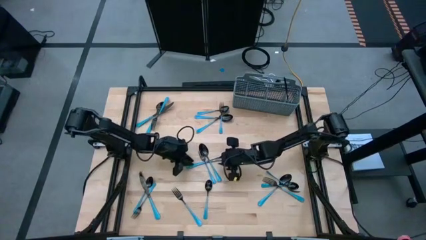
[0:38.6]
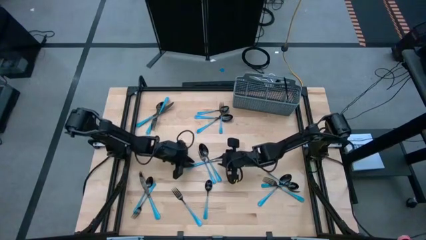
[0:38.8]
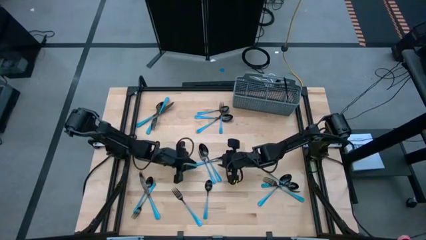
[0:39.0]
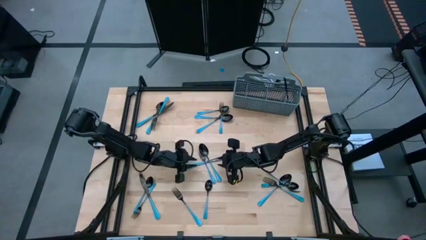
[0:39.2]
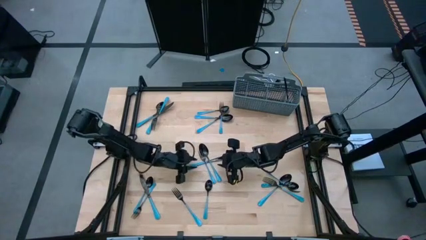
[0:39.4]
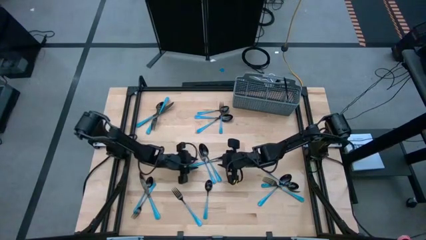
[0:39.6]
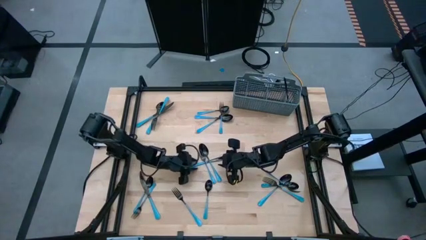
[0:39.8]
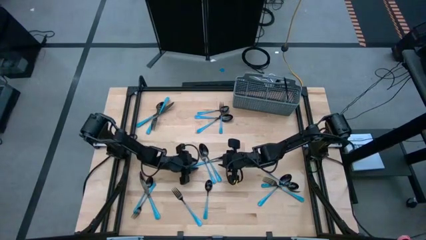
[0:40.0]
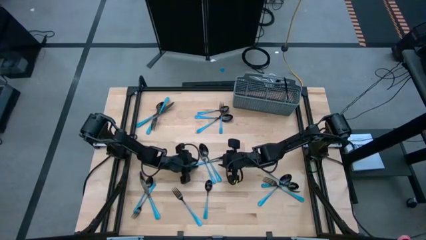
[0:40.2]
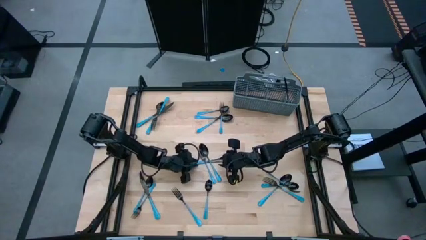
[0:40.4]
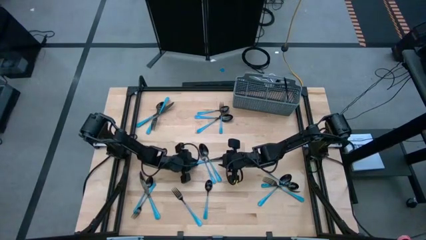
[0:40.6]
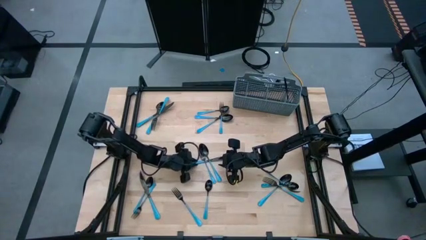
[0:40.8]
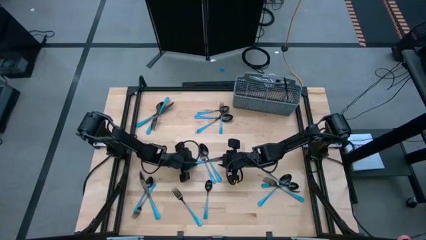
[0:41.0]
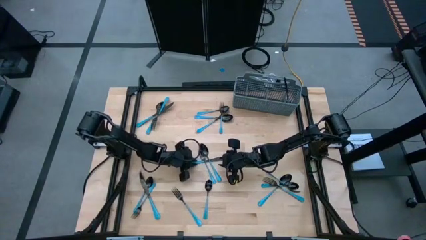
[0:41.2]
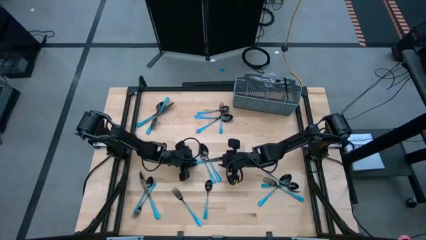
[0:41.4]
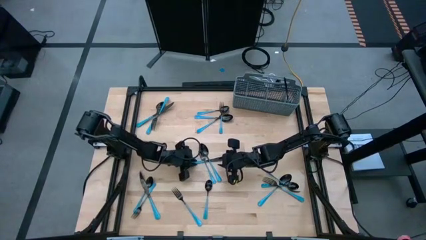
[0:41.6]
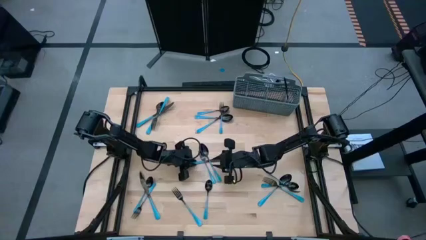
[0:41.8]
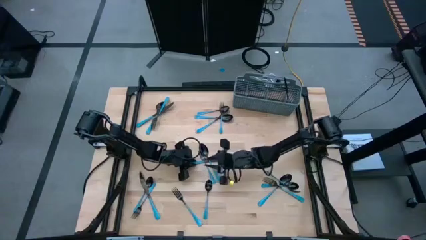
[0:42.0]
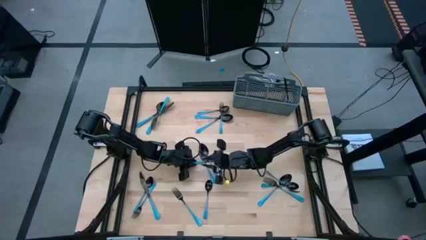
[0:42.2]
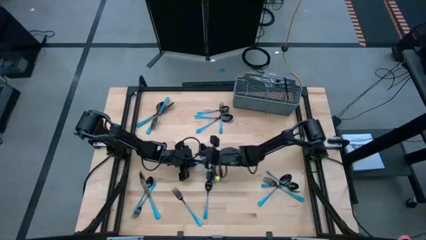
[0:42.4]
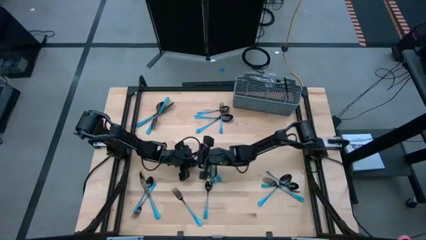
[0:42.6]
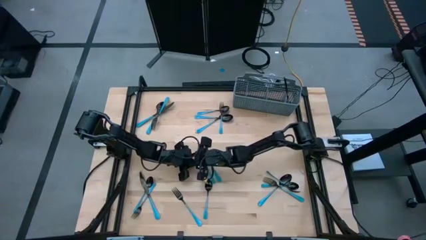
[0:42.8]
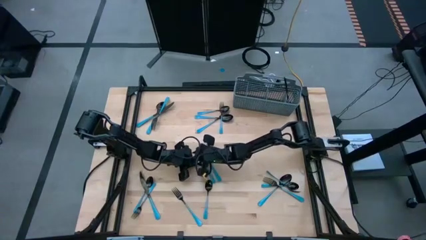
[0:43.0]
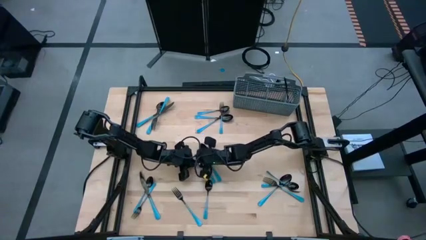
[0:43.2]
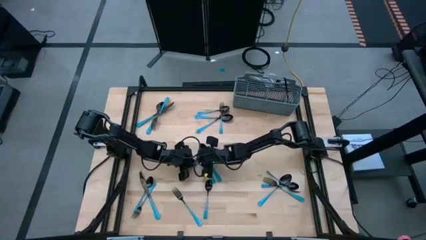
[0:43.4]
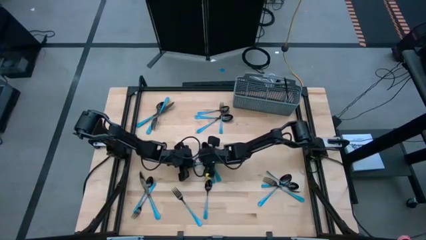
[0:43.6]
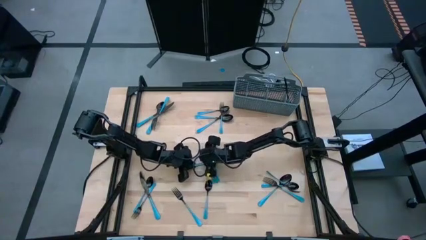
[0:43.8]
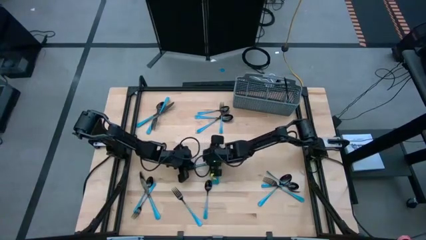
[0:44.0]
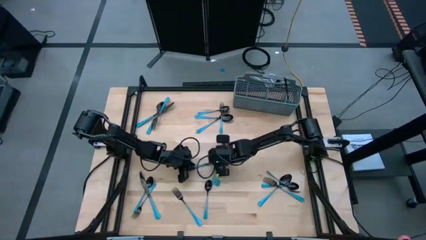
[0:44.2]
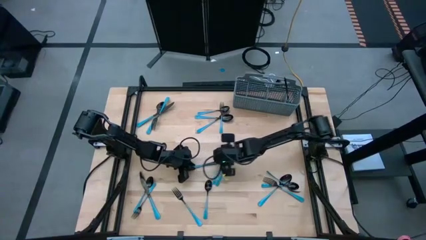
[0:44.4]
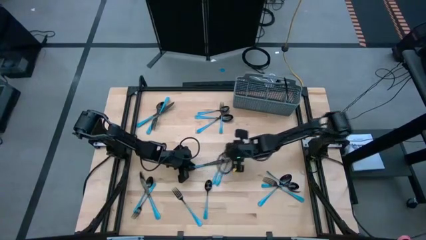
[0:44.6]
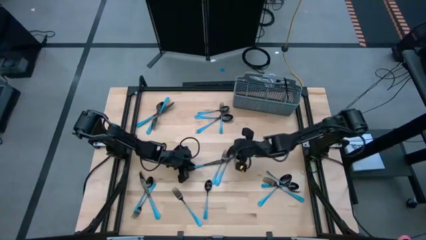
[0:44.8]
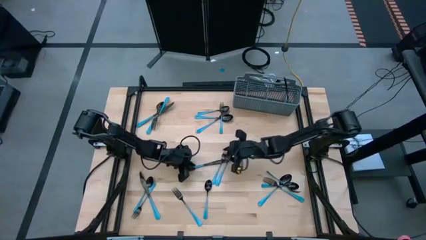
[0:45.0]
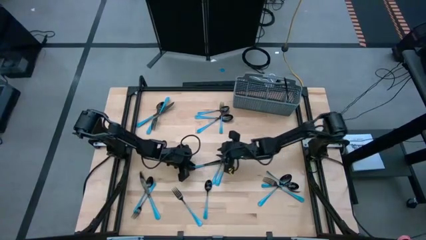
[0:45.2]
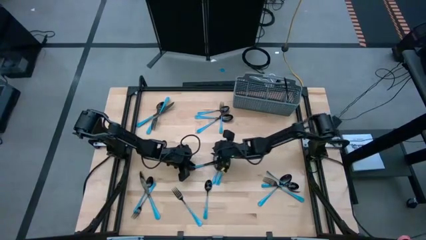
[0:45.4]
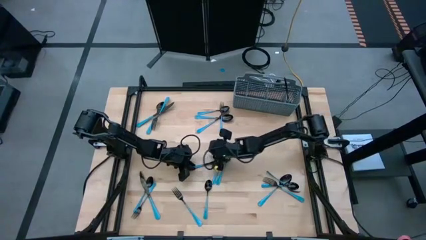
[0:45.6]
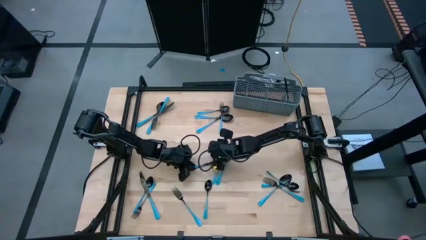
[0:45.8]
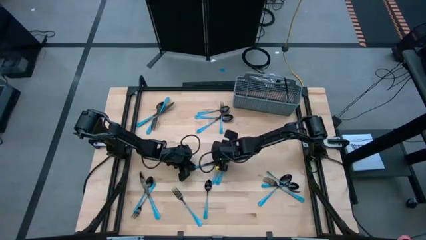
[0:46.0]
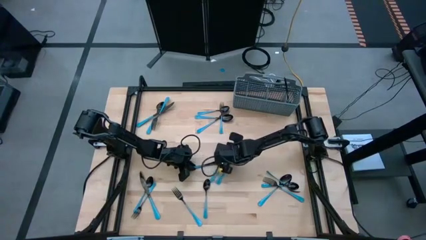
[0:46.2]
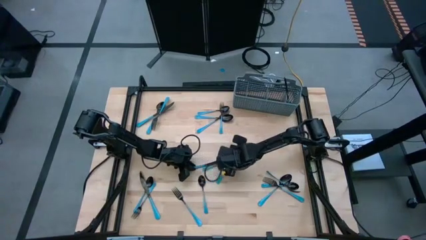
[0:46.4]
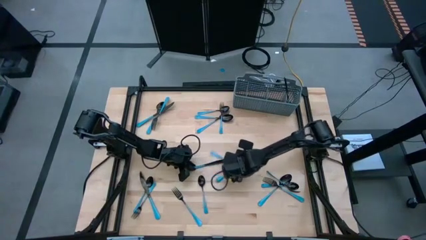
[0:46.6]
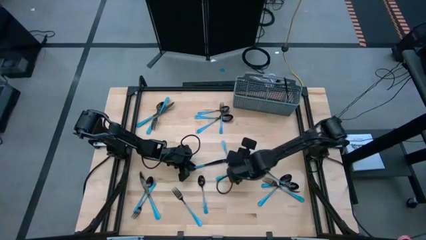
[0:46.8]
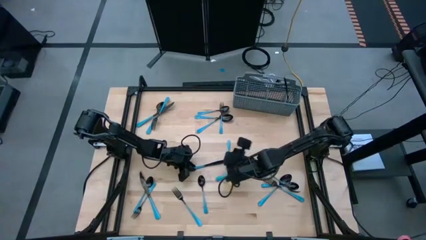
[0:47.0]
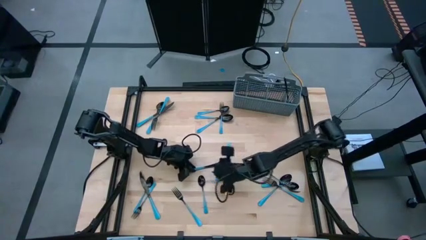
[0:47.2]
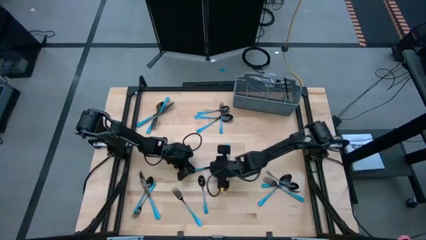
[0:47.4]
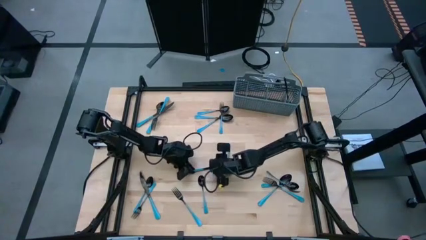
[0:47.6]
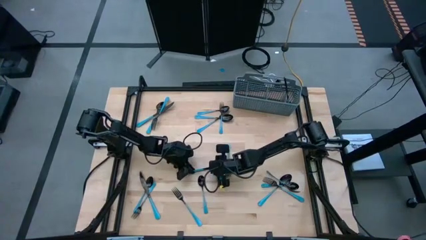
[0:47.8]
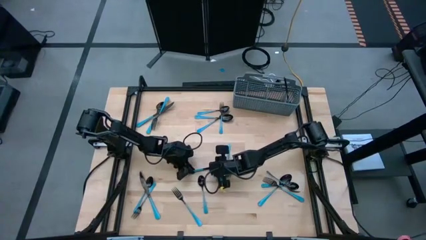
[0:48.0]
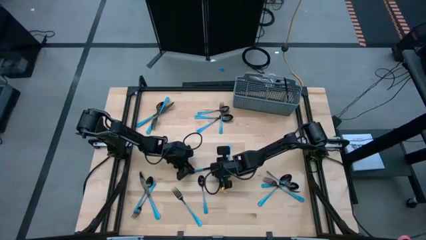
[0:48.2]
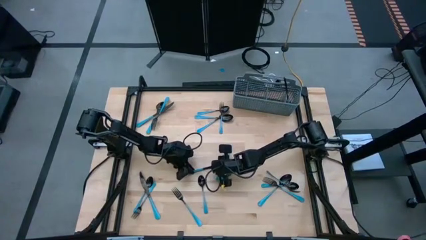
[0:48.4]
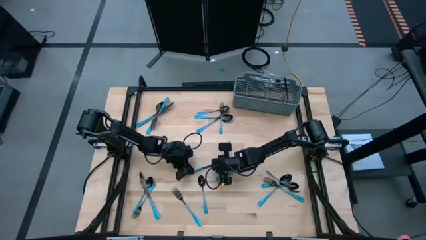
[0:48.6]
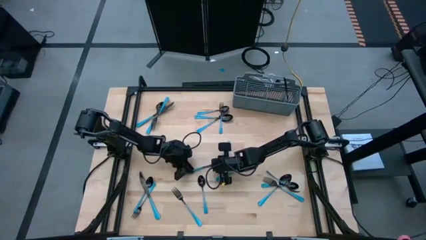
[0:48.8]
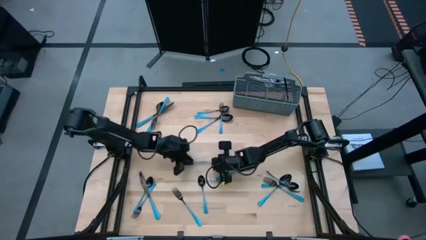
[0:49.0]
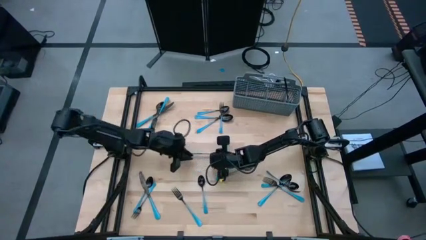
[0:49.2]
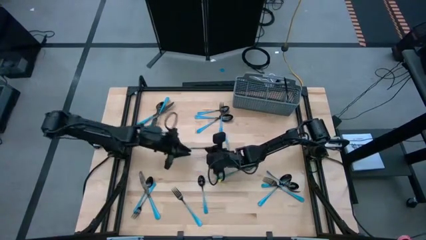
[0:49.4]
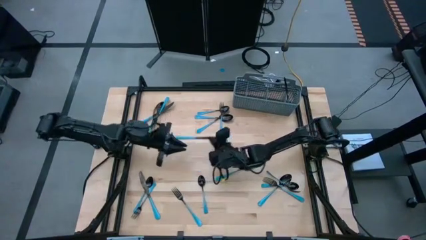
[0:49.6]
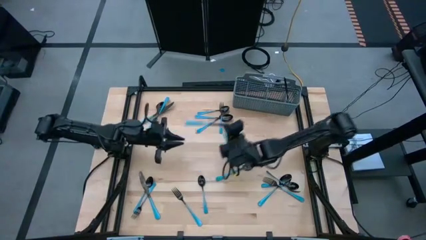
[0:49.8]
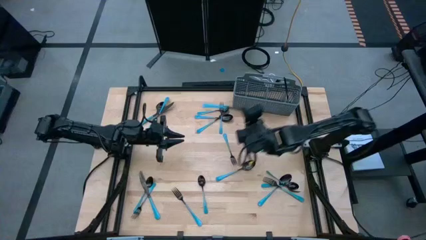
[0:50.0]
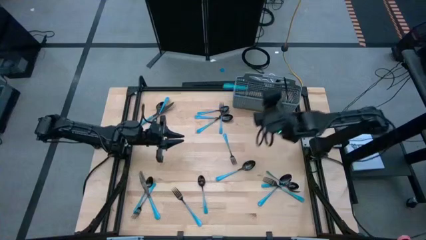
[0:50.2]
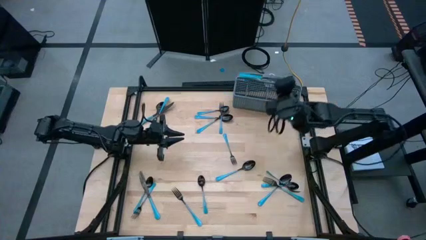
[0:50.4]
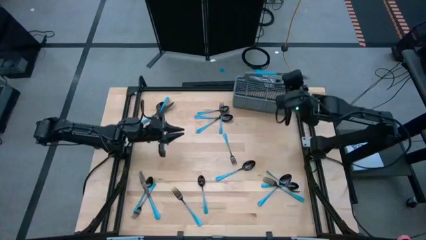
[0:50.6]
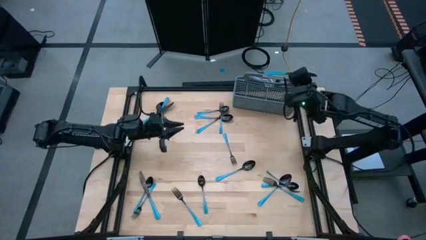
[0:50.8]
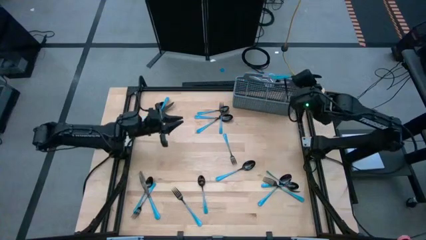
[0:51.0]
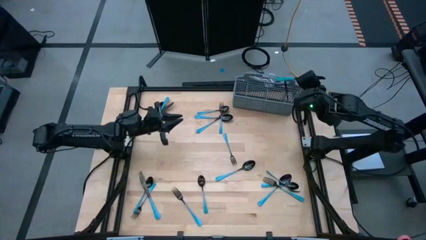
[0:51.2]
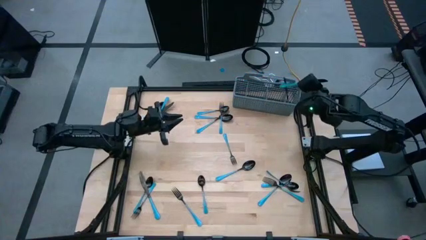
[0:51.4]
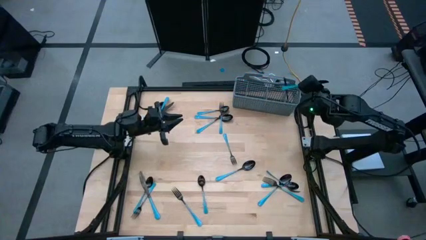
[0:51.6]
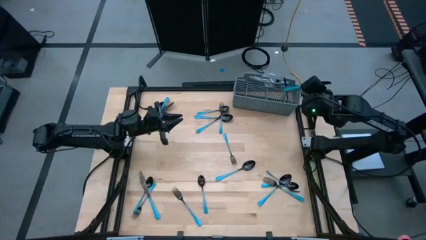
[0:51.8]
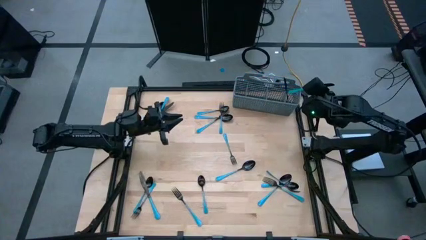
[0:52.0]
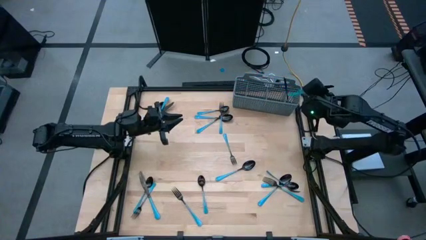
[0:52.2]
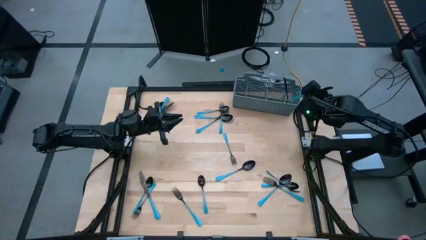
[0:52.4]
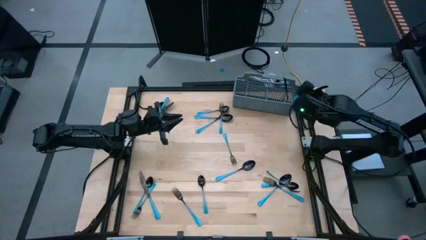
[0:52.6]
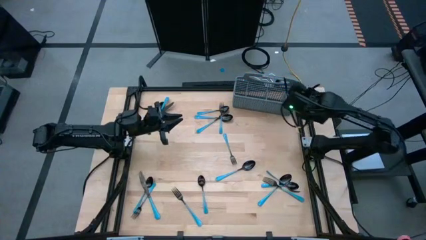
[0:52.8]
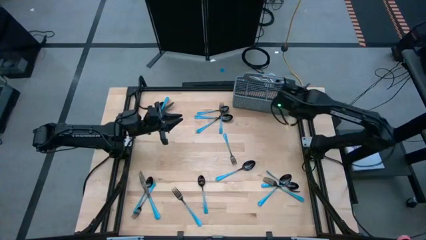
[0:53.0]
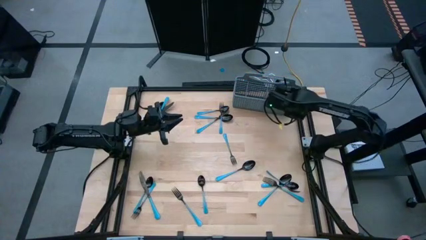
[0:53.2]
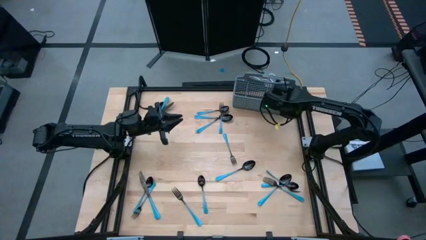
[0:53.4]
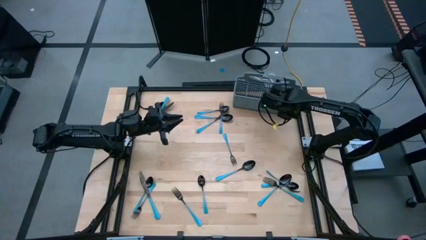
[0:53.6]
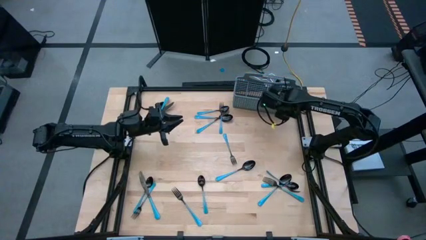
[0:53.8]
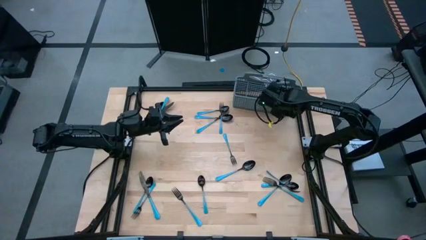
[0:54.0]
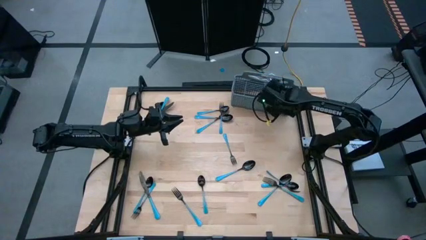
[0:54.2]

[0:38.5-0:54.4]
Task: Sort silverware
Put the blue knife into the right of the blue utensil organizer
